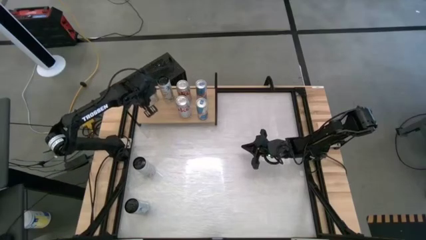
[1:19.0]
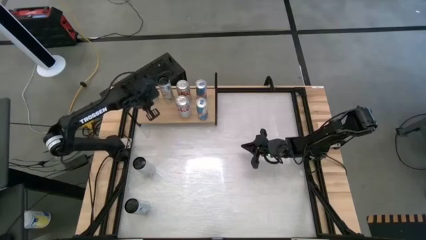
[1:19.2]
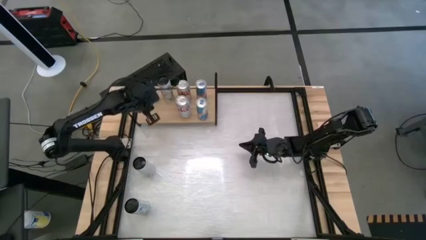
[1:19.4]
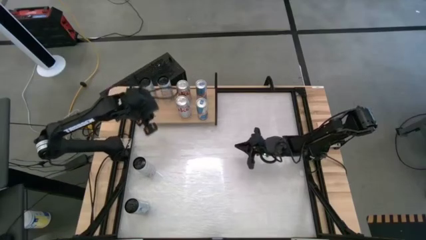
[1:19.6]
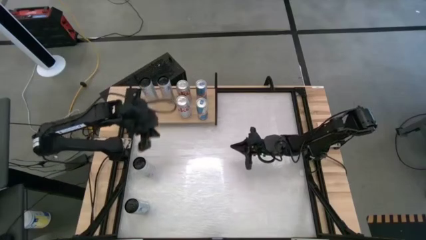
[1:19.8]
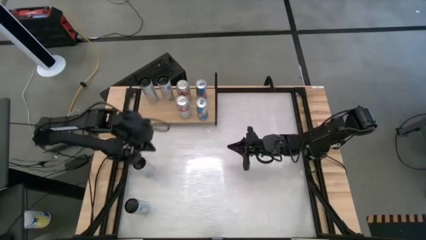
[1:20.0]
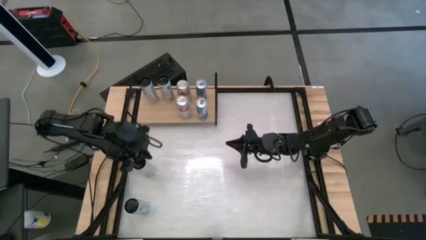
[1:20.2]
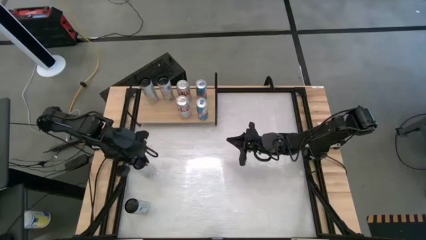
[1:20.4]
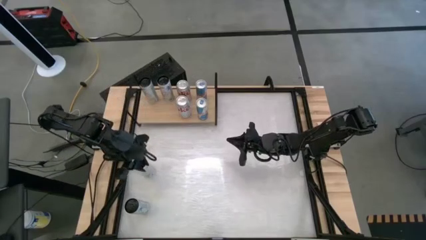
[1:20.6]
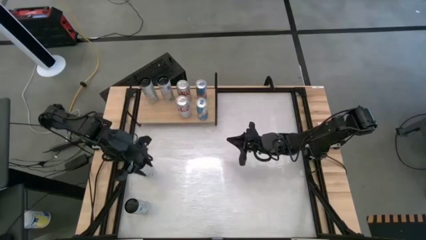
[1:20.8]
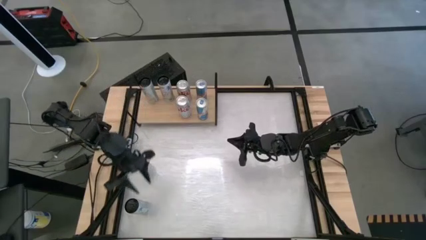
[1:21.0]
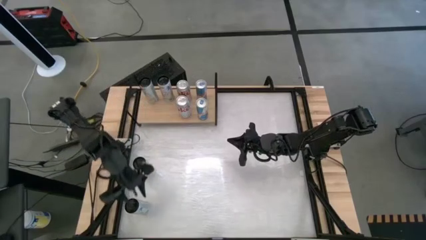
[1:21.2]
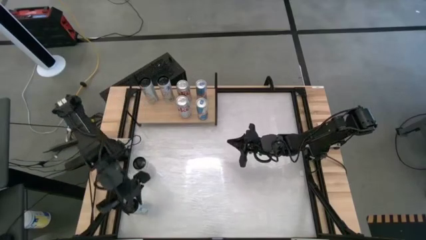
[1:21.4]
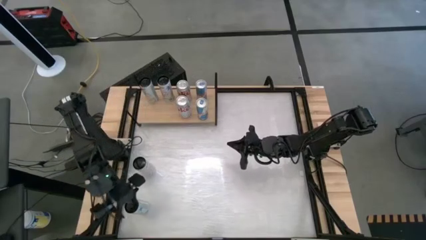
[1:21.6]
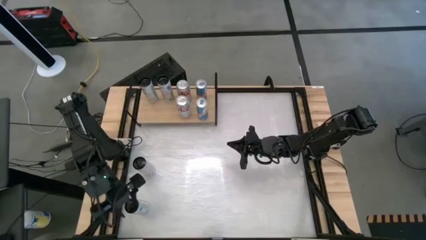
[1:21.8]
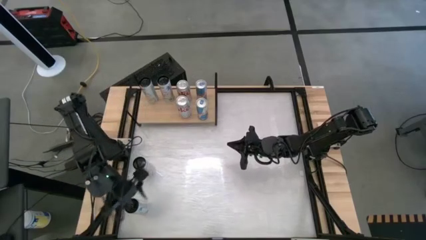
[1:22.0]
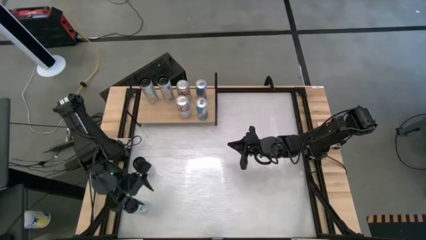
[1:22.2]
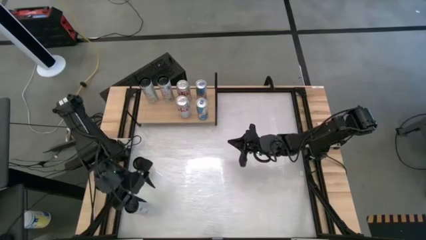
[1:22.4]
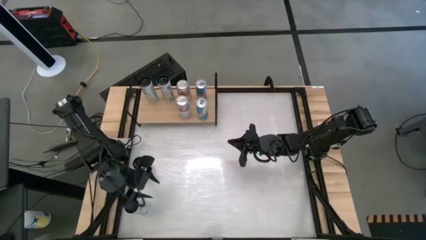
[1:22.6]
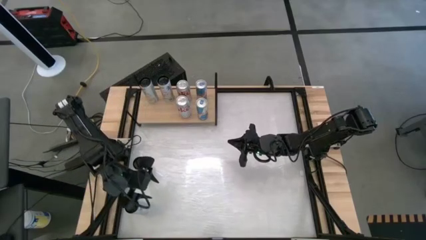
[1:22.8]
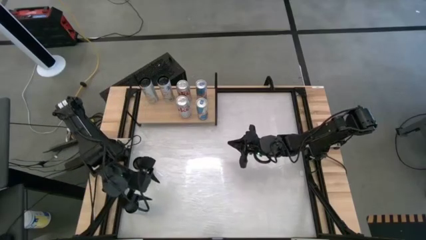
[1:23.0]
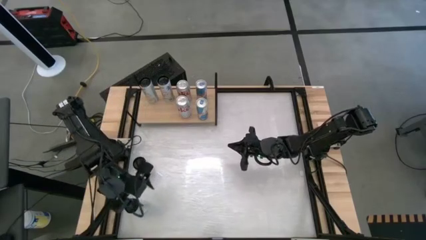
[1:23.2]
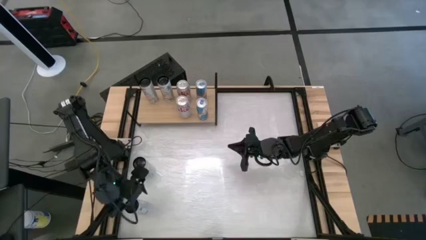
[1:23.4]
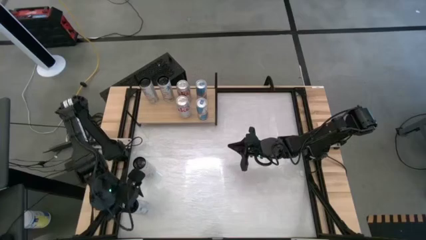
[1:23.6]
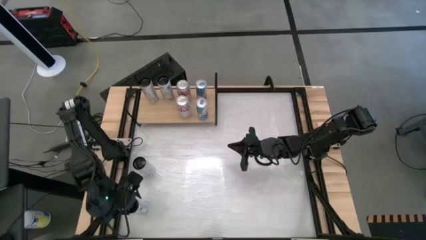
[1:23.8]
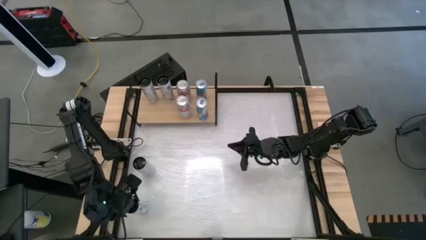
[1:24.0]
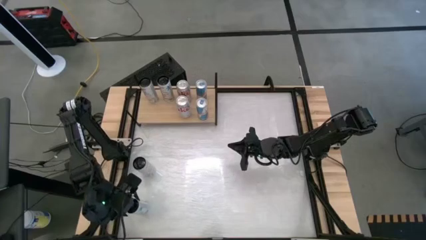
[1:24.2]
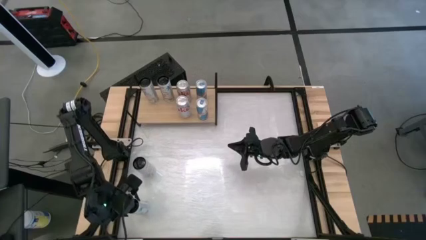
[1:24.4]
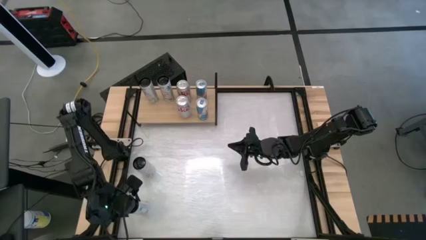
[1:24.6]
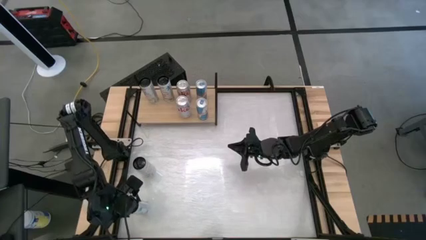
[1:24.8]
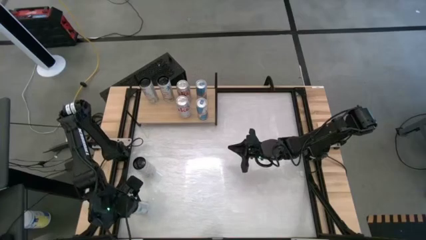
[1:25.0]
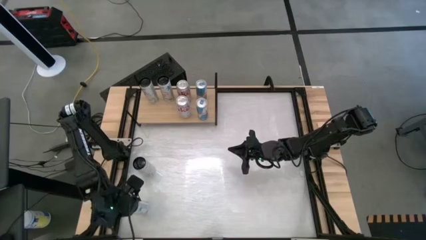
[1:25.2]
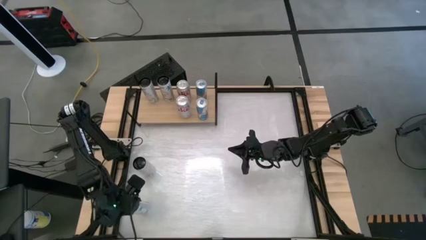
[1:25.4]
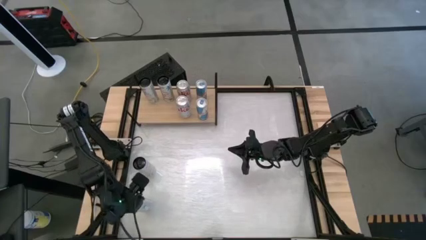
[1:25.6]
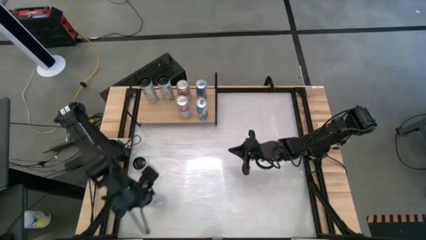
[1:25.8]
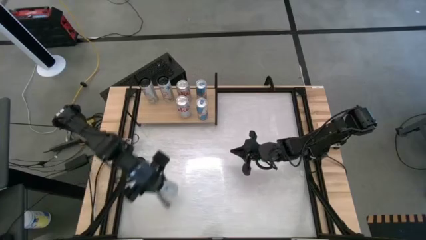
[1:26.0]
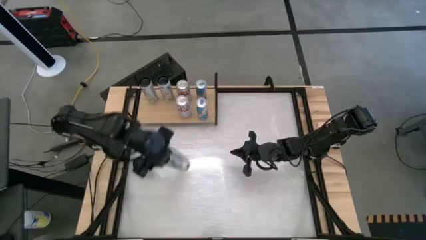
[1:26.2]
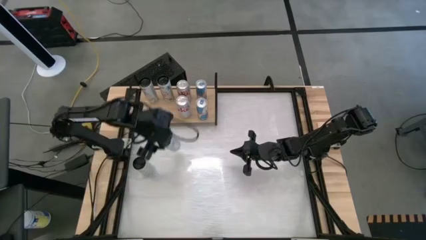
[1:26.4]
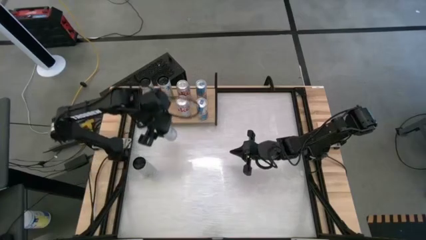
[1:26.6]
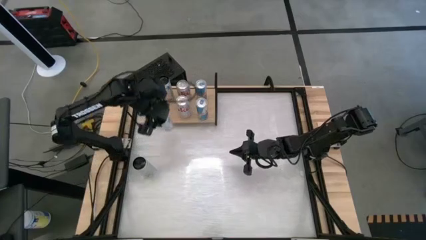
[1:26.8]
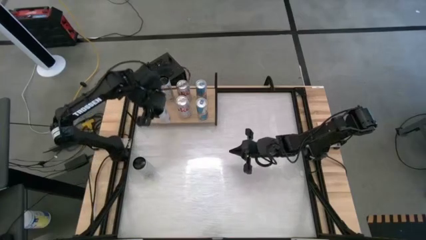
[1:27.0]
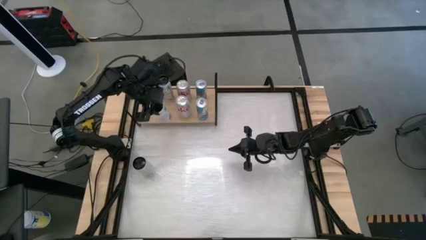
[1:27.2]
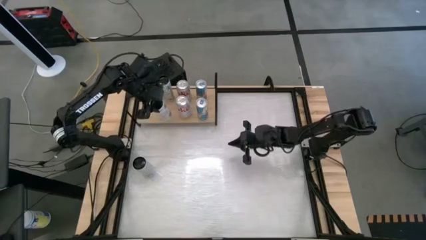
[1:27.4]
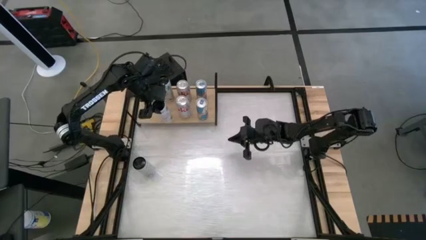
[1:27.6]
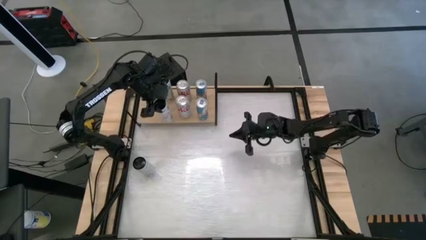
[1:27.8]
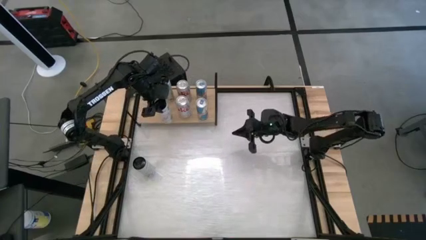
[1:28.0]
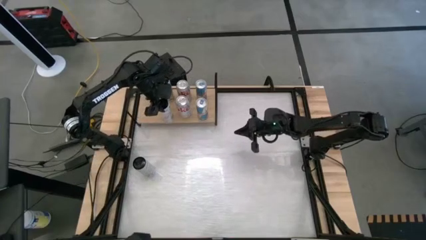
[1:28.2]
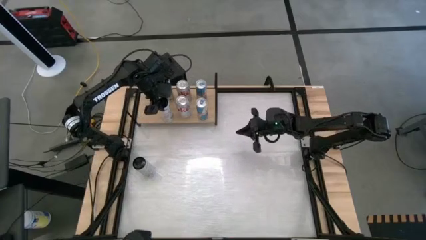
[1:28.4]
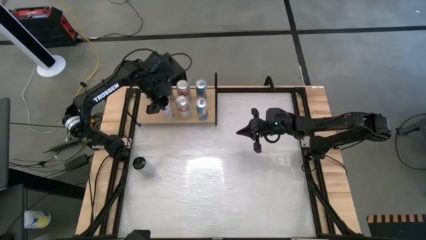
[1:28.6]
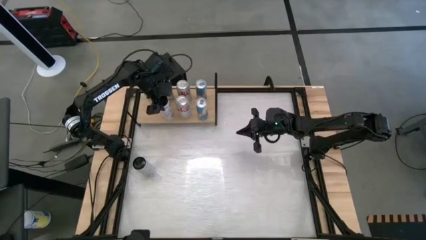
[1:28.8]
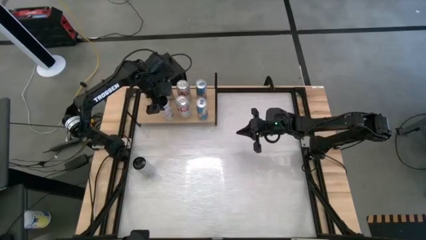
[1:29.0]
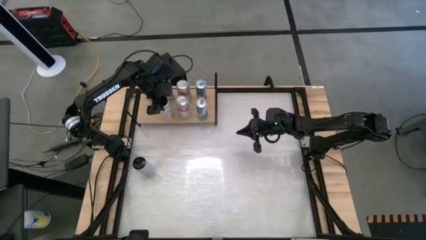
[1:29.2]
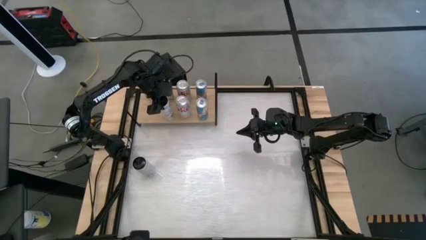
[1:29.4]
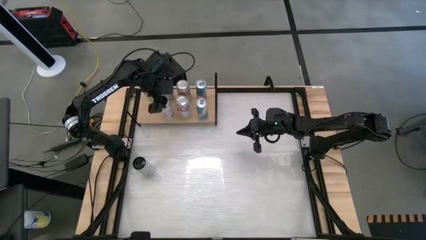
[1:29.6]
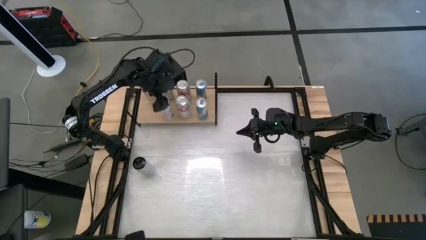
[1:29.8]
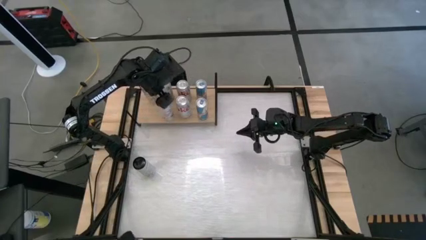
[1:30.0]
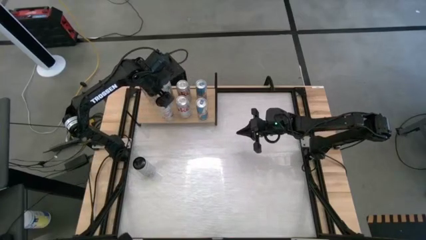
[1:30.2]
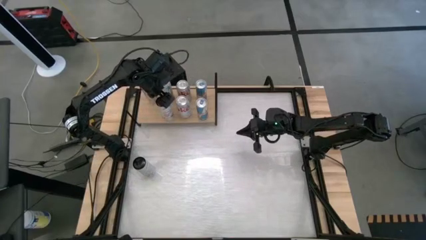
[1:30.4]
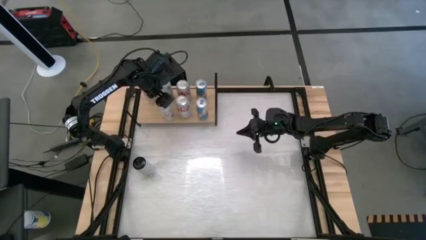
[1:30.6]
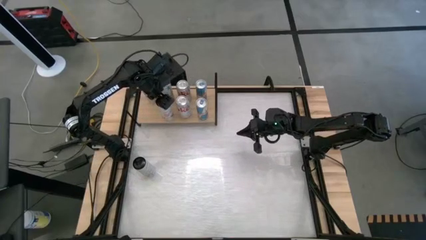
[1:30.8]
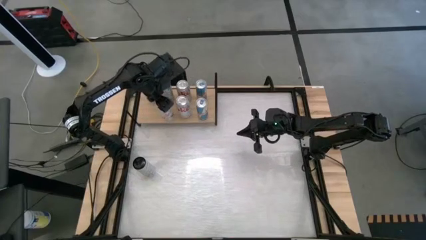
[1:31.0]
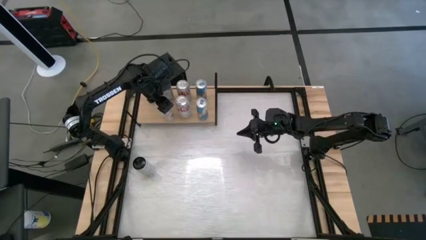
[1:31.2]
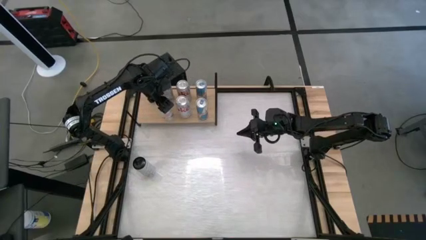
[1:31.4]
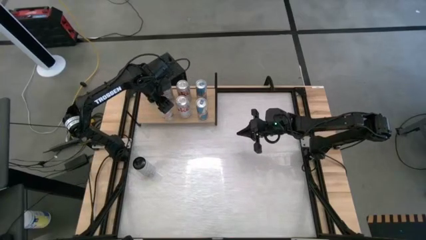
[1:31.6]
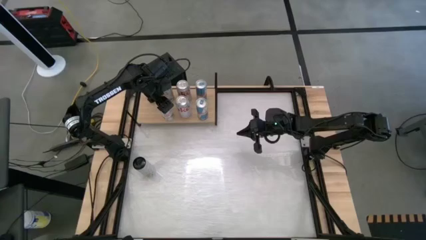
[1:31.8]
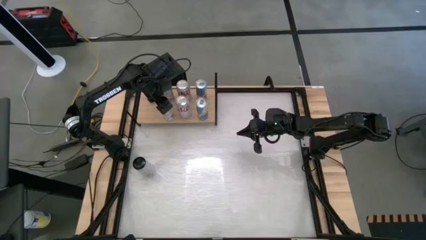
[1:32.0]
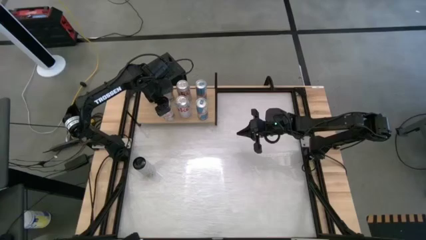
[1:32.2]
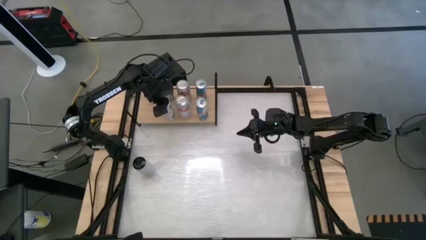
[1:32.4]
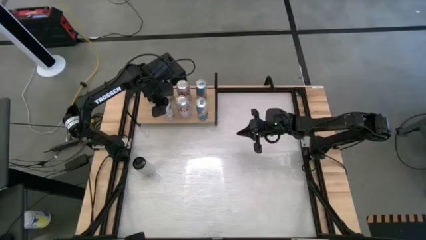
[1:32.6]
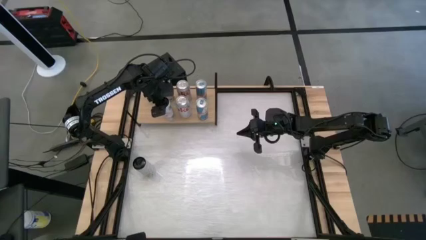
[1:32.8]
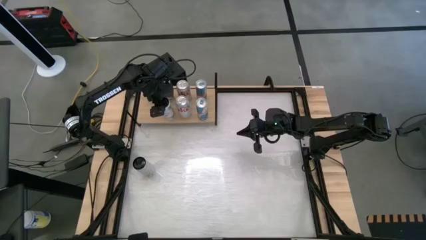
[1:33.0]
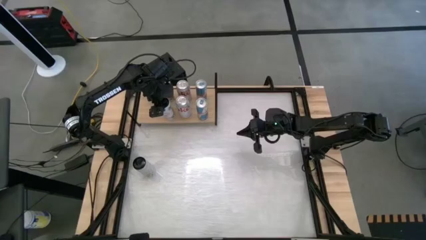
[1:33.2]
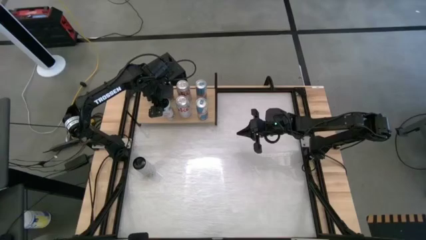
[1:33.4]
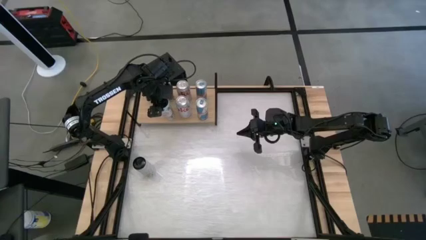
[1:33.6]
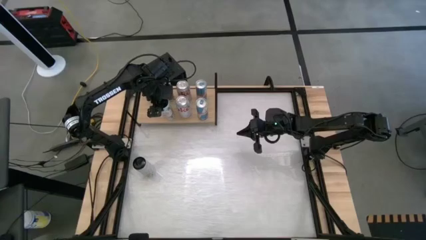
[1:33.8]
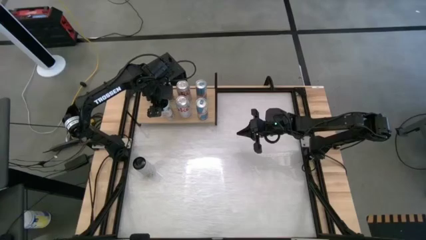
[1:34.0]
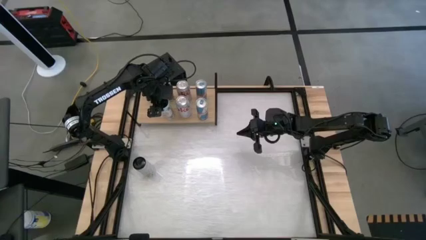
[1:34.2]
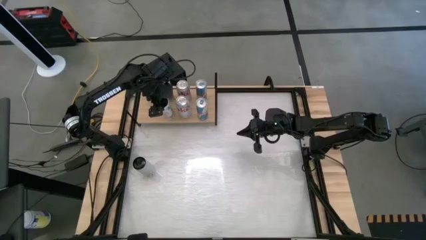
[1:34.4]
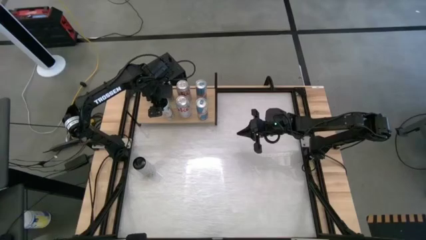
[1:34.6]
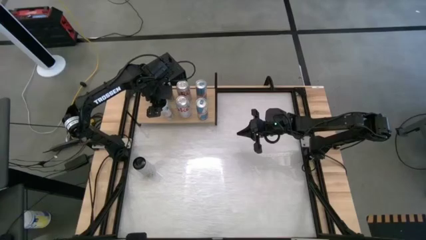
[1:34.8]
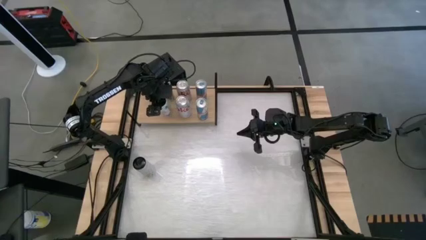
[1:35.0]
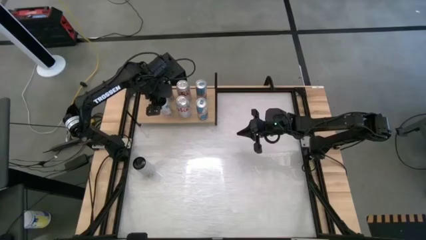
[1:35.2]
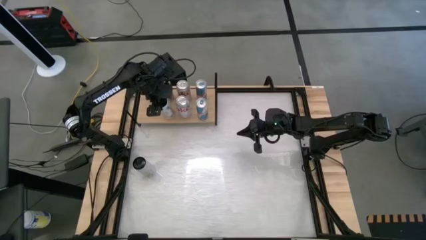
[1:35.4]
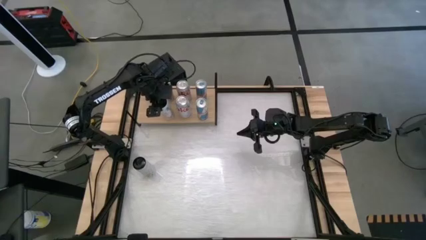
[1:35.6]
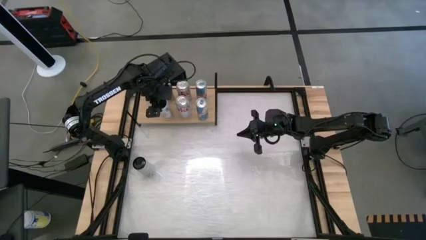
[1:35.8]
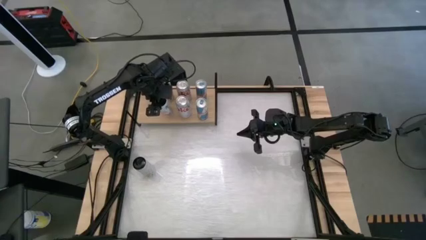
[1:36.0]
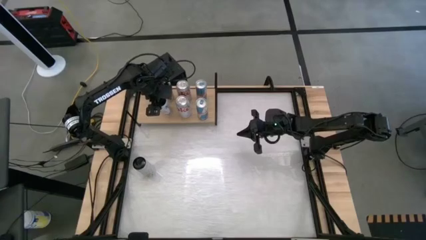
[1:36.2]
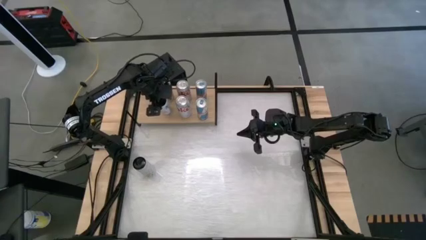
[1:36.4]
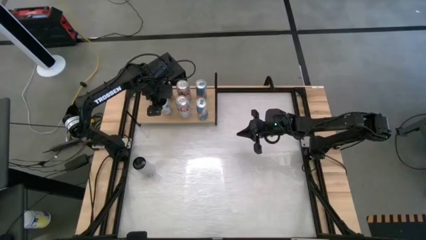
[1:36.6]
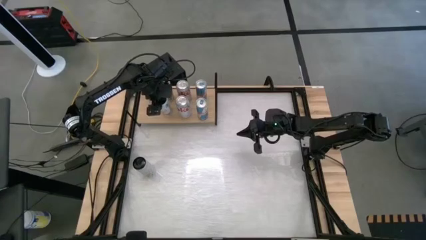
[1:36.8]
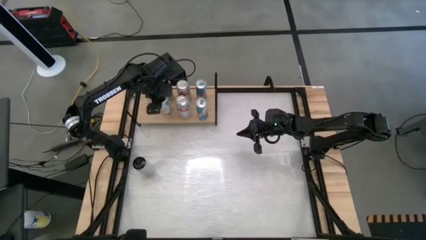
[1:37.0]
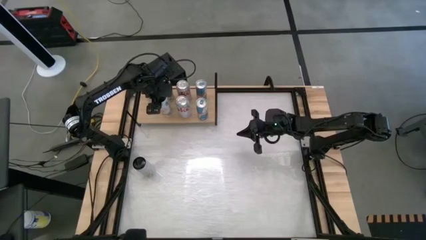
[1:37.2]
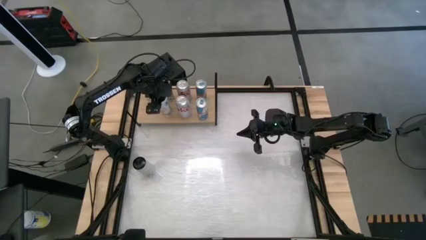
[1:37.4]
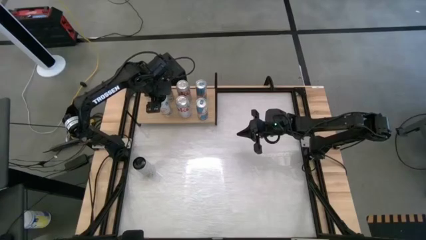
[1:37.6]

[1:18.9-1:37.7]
Task: Place canned beverage on shelf
Put the bottom white soda can on the shelf
